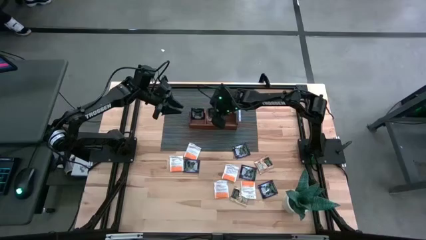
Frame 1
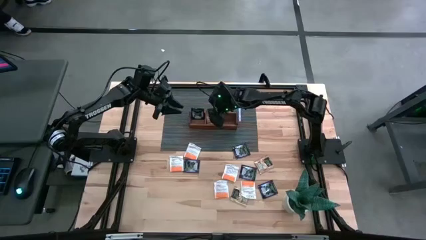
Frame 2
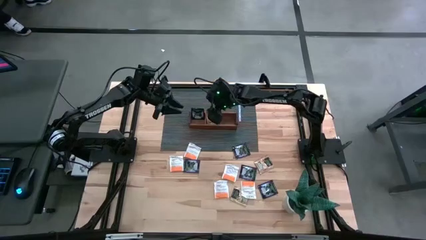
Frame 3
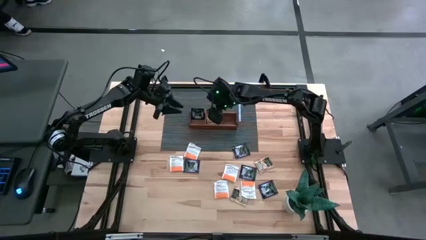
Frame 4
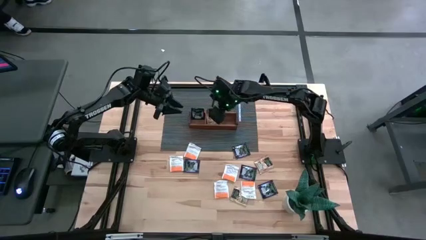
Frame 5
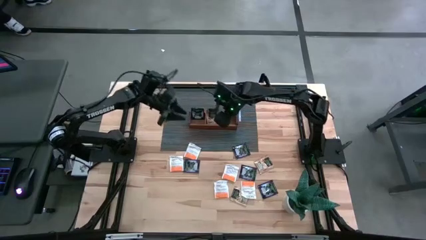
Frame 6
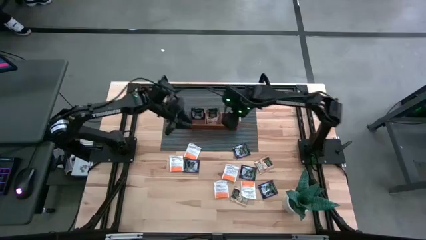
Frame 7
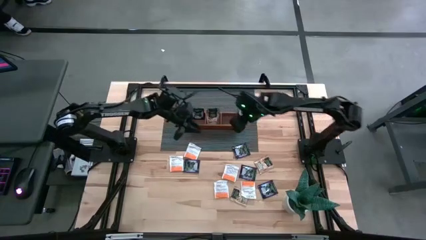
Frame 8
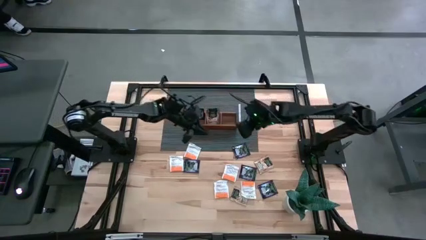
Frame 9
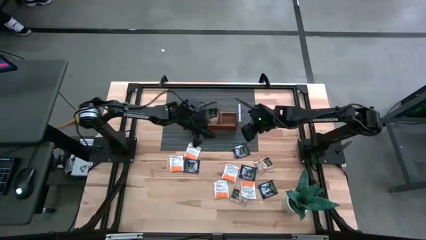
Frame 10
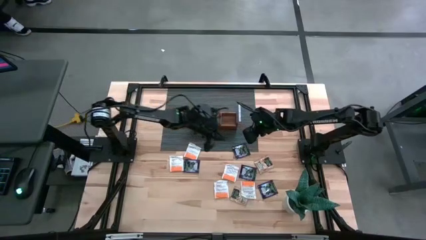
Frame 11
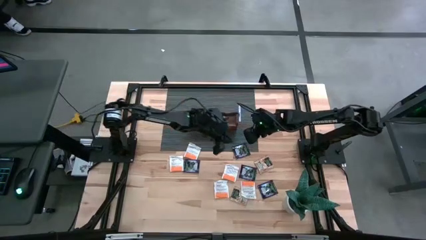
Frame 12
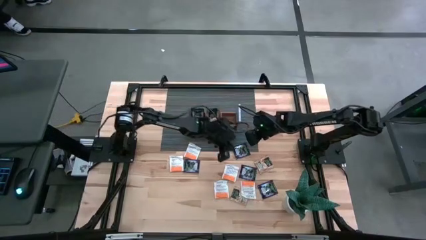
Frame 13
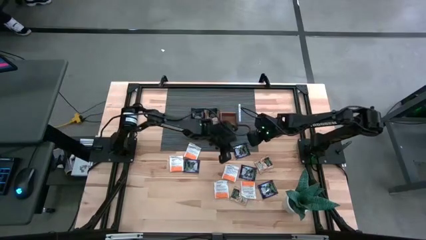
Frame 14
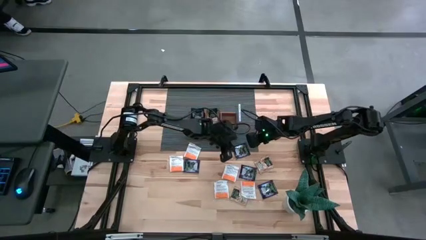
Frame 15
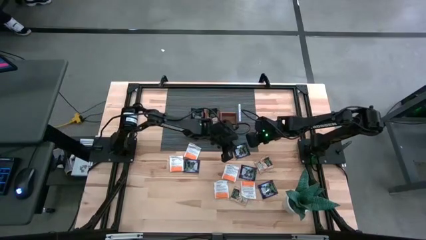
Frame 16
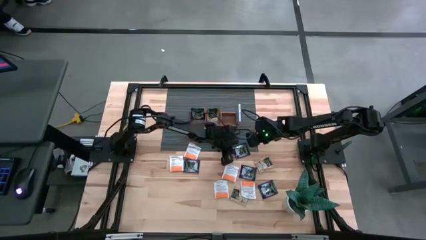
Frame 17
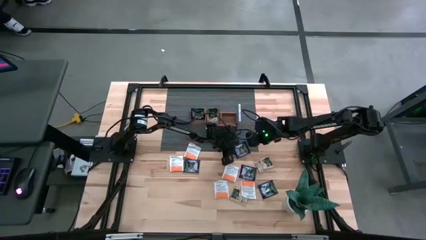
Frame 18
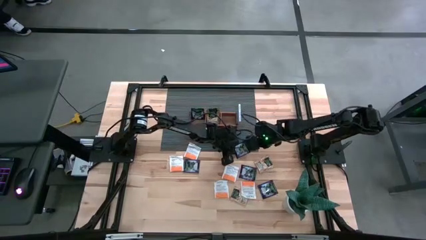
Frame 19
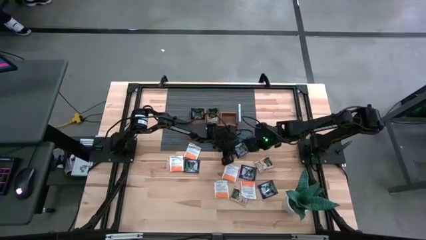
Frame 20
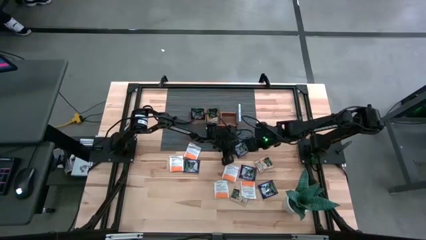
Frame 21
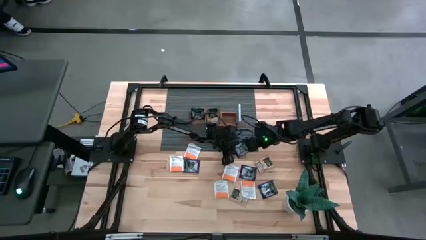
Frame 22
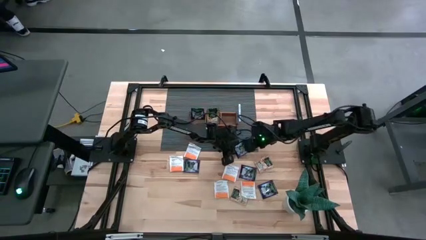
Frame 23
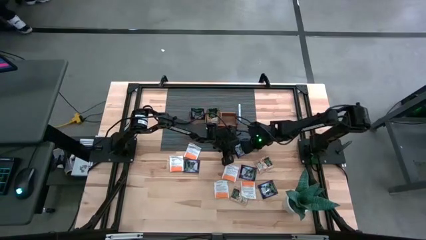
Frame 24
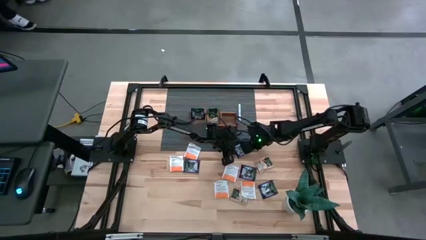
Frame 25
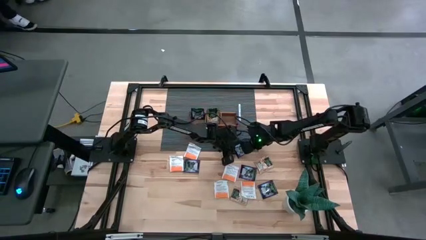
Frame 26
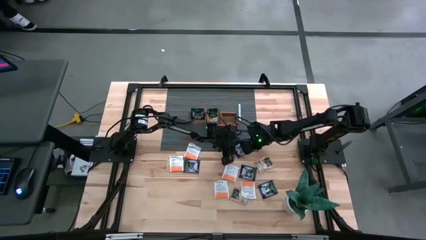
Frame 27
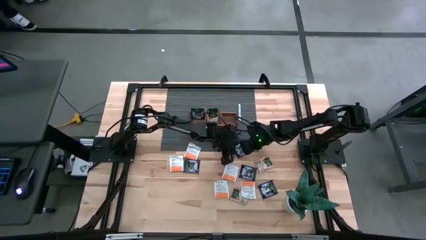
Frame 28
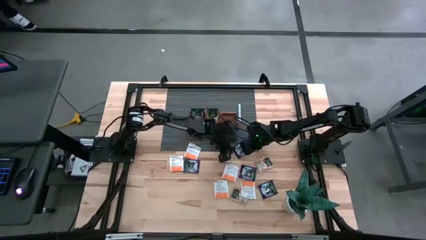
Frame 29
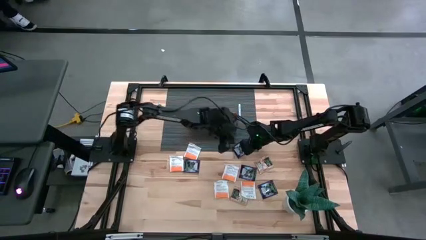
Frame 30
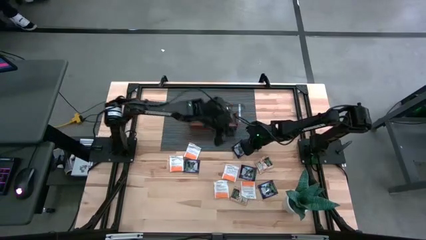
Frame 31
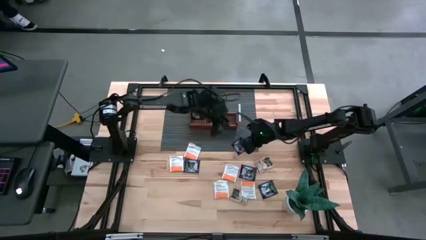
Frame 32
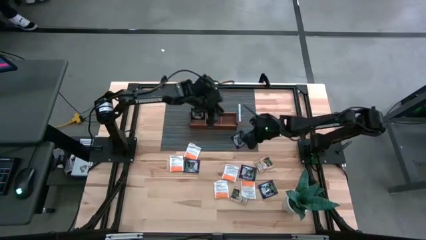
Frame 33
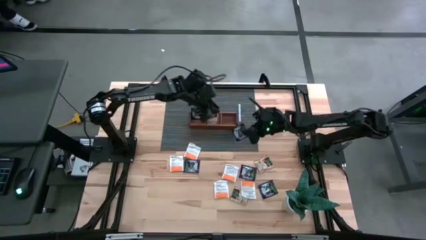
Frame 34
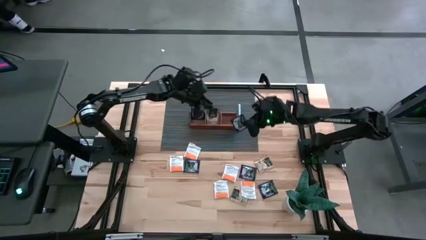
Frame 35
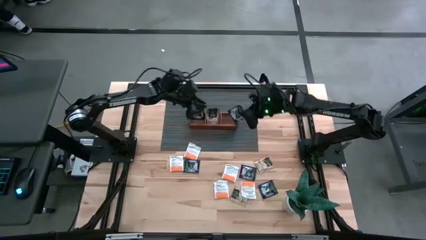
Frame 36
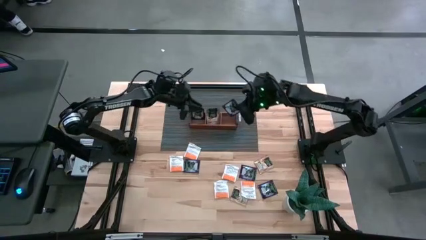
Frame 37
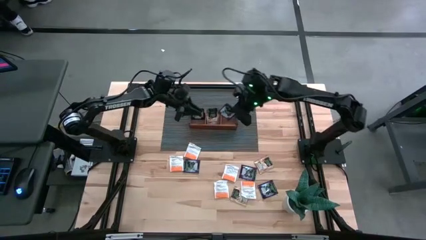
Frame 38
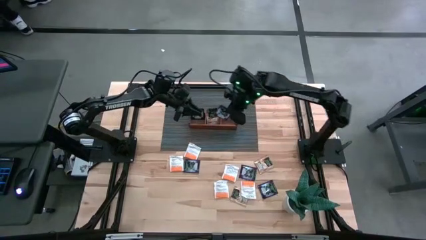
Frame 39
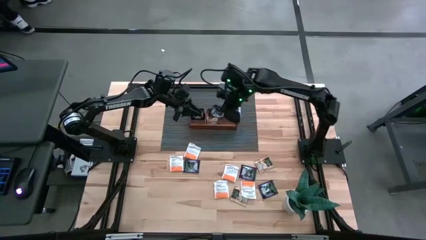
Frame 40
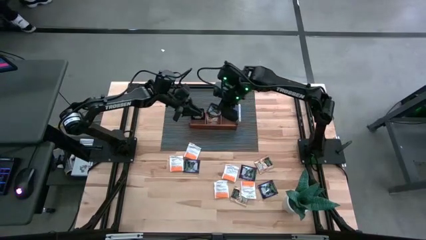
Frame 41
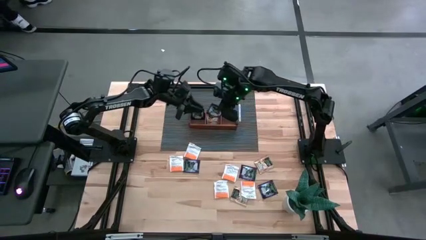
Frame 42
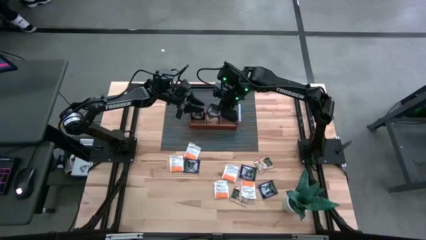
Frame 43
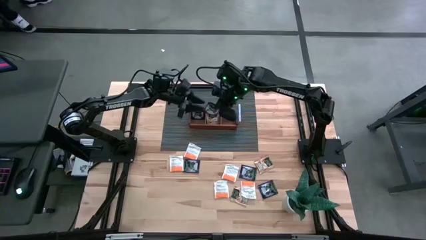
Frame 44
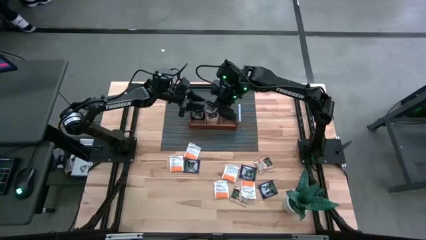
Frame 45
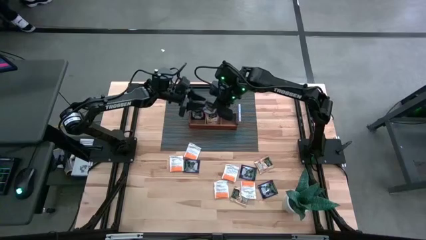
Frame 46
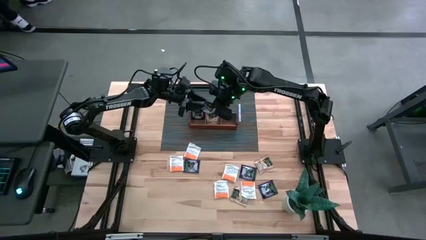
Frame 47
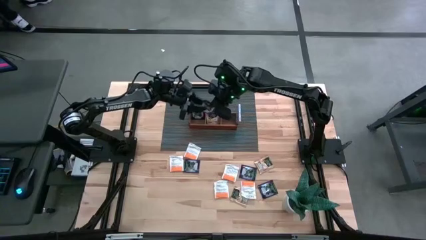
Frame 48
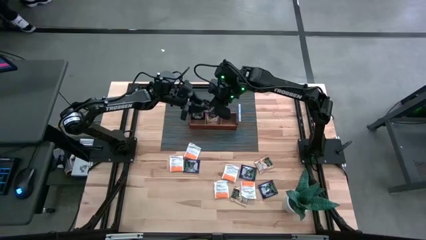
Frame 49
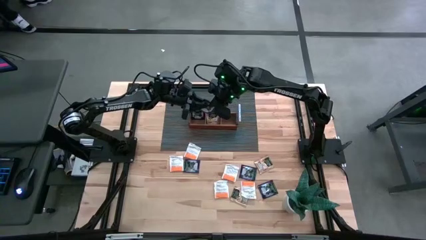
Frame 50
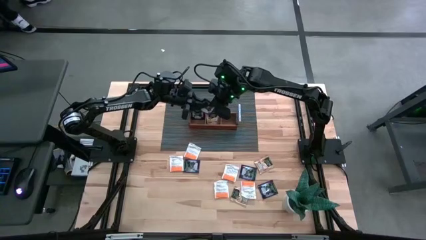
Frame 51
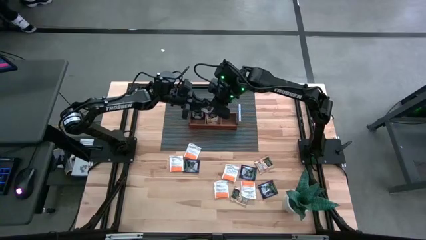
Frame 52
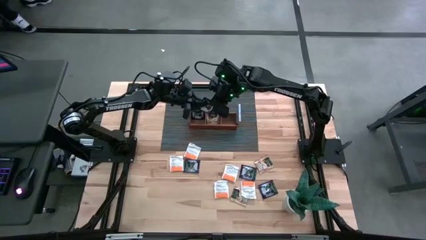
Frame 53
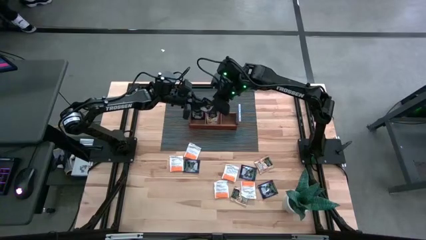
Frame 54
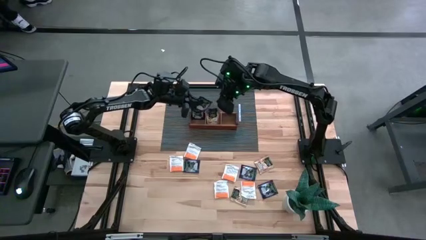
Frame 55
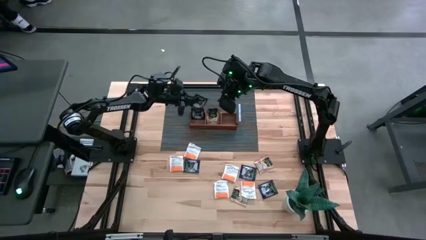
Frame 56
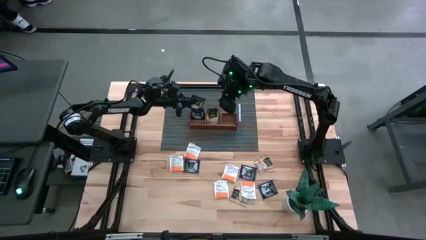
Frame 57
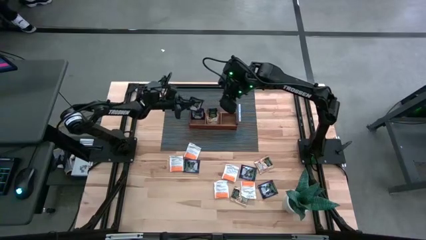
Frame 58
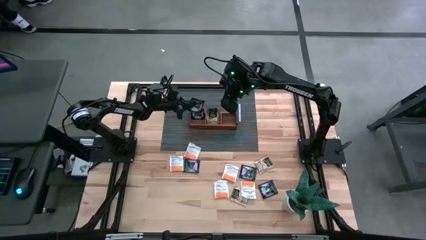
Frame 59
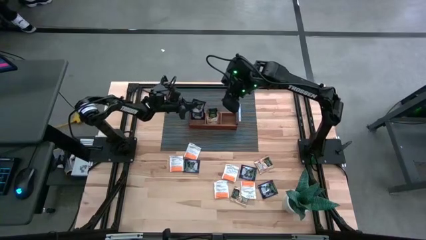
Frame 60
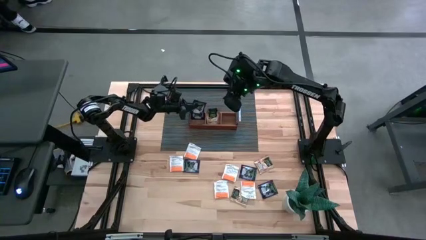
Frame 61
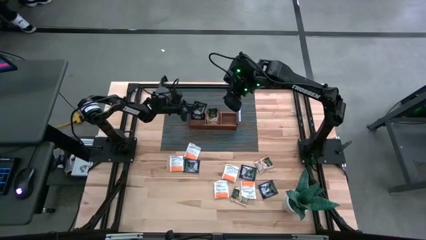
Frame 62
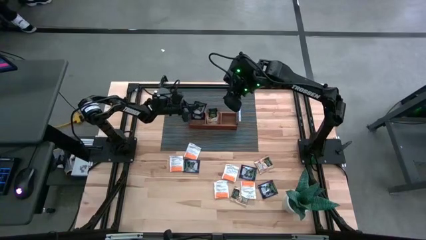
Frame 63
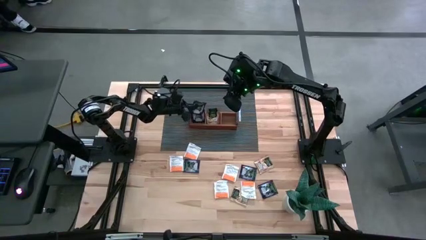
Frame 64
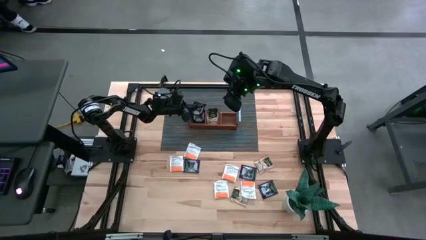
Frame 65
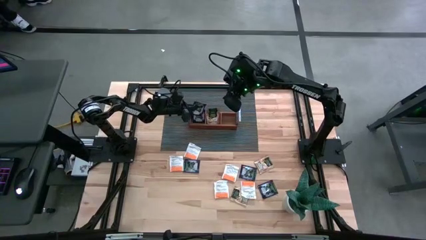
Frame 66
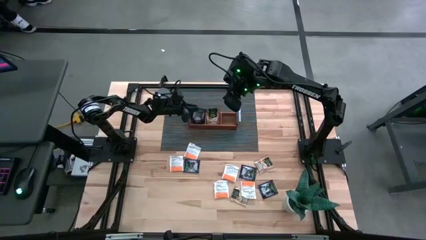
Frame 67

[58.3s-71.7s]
Task: Pick & Place Tea
Put the violet tea bag into the left section of the wooden organizer

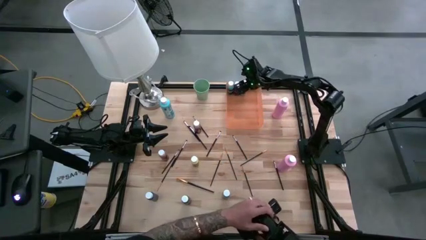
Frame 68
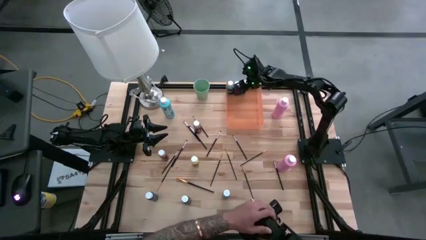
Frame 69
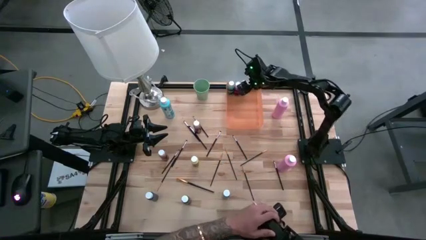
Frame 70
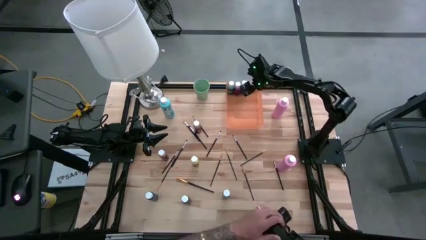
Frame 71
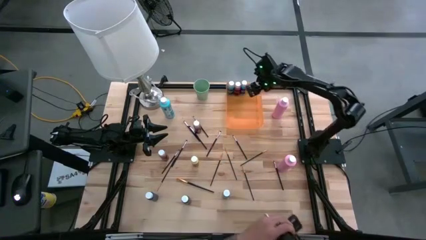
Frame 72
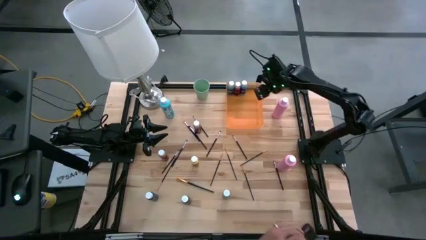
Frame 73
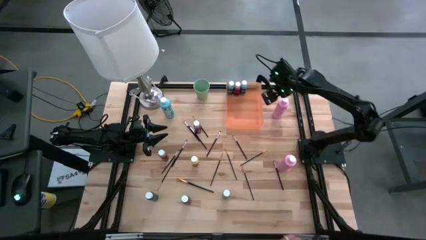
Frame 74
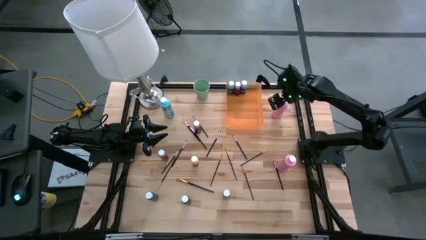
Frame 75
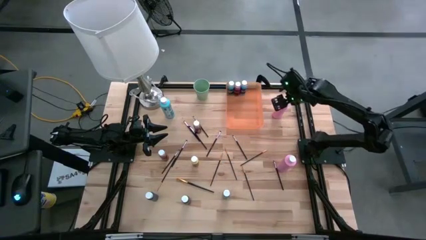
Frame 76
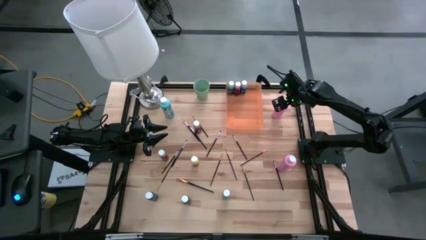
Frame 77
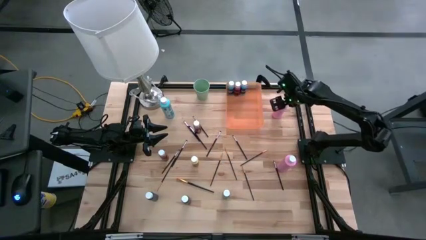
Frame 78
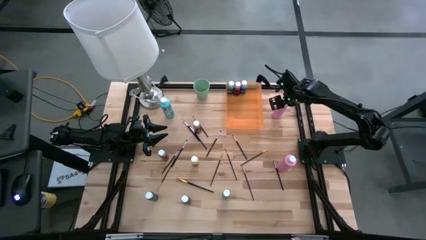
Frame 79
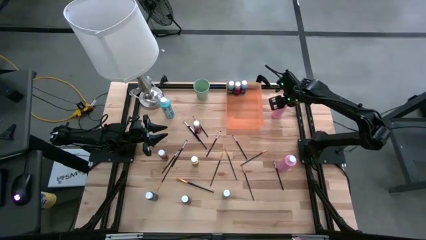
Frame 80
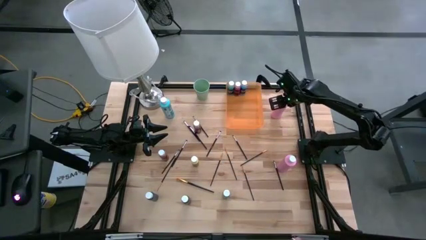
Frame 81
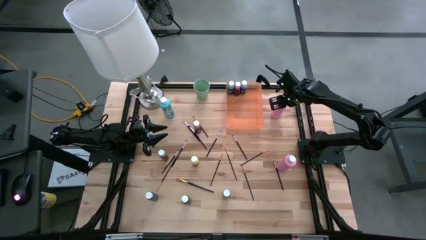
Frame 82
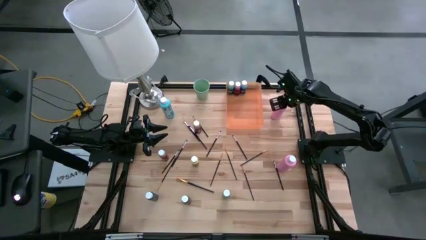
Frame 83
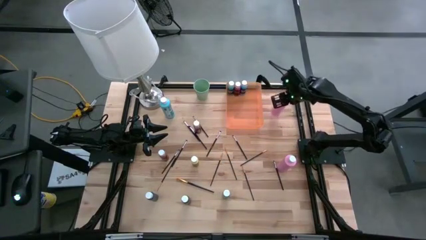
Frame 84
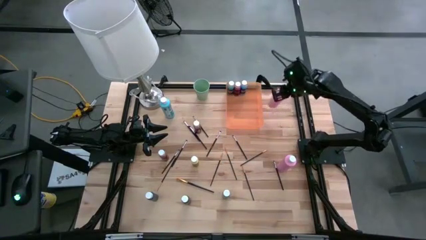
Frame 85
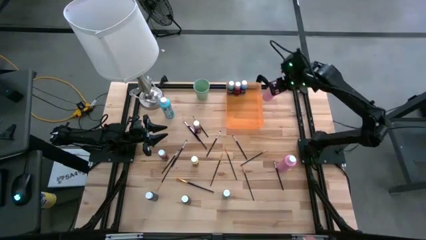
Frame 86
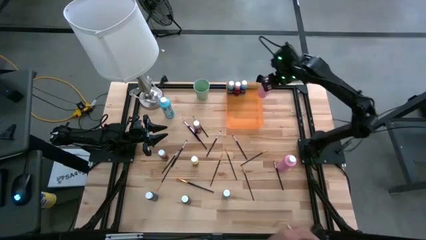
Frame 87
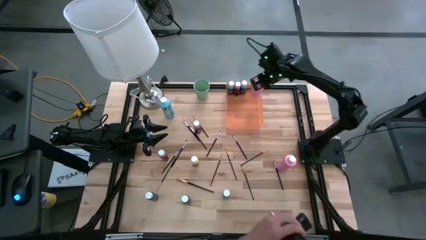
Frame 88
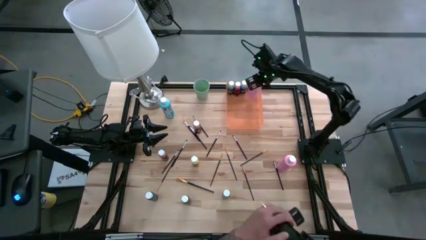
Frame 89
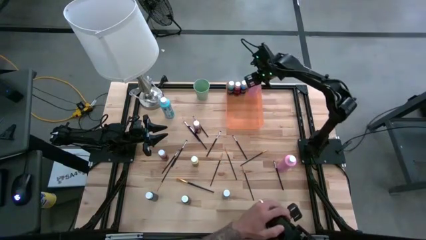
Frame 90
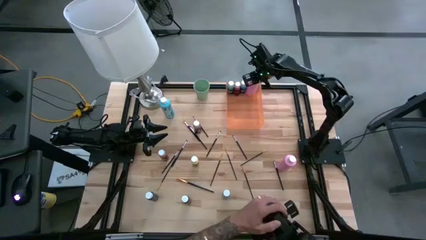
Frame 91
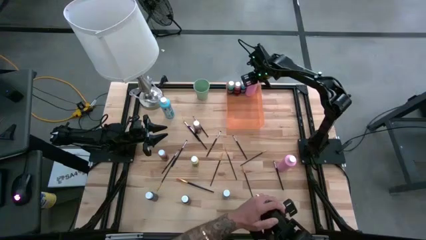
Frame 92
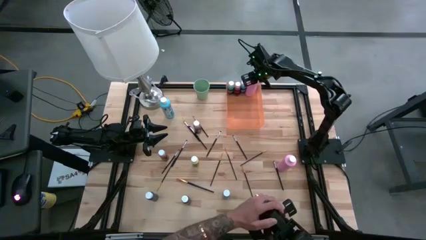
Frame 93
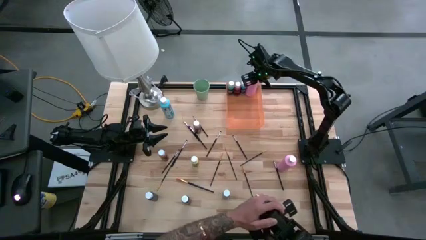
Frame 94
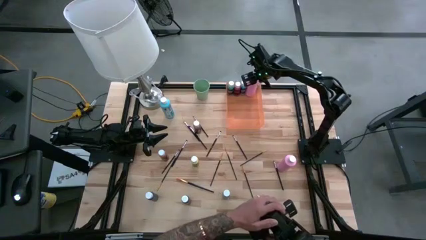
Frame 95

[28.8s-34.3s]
Task: Pick & Place Paint Supplies
Put the large pink paint bottle into the orange bin
